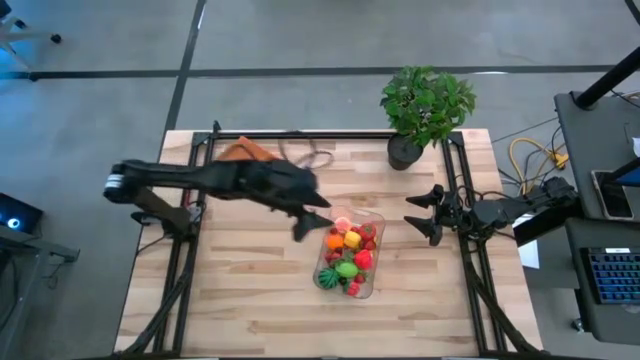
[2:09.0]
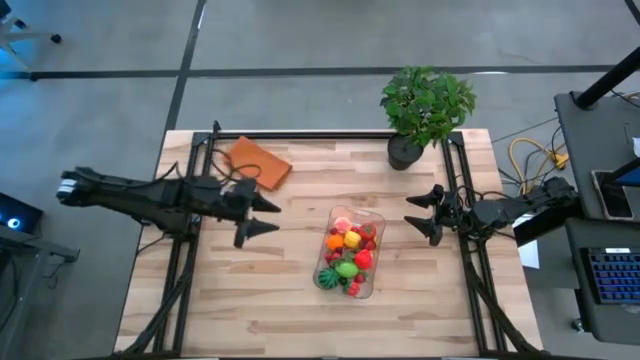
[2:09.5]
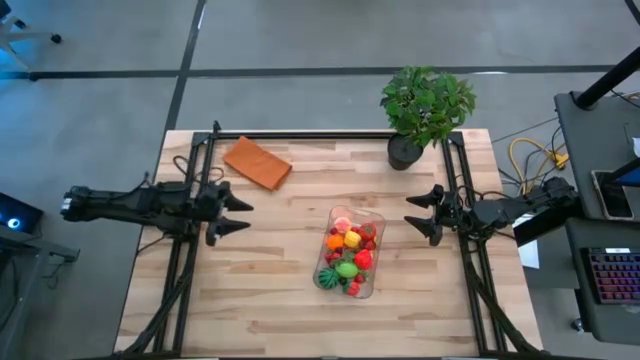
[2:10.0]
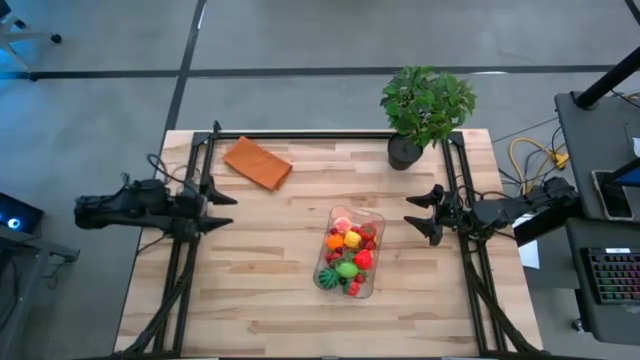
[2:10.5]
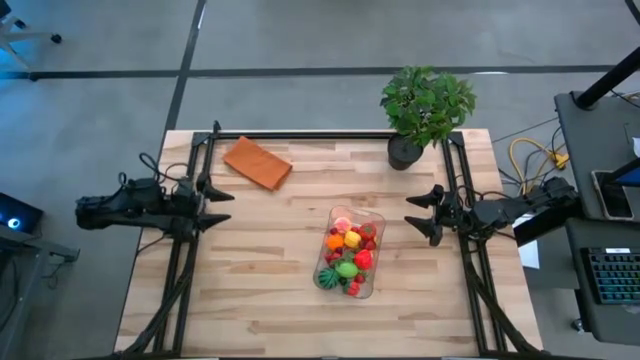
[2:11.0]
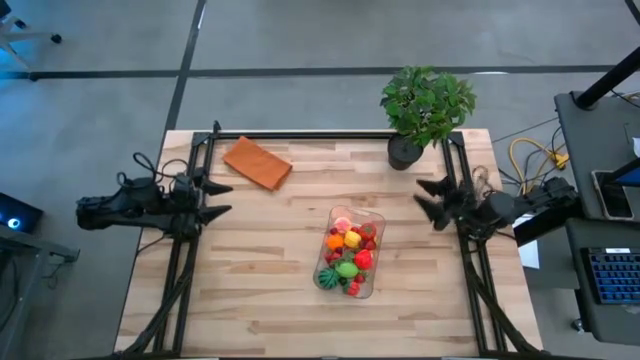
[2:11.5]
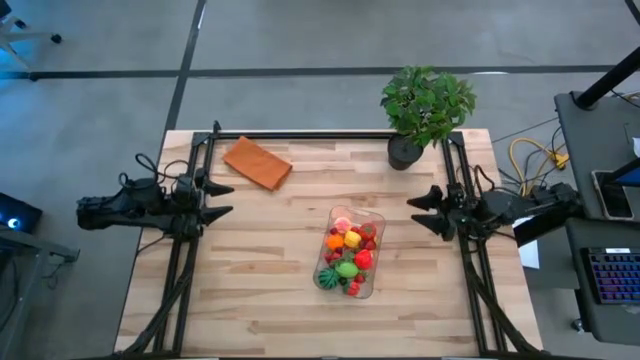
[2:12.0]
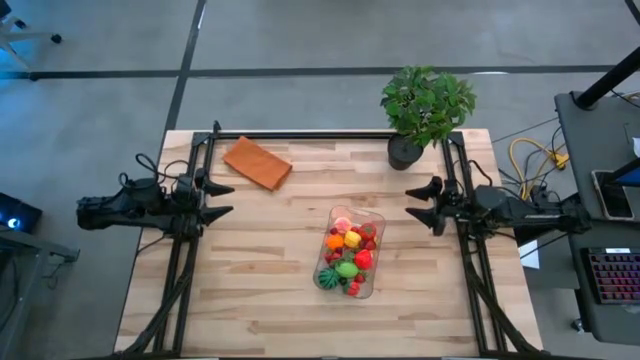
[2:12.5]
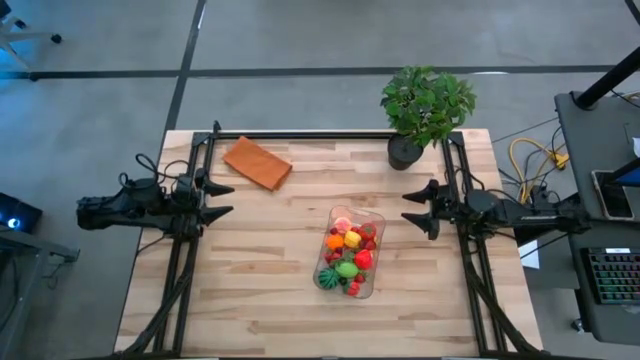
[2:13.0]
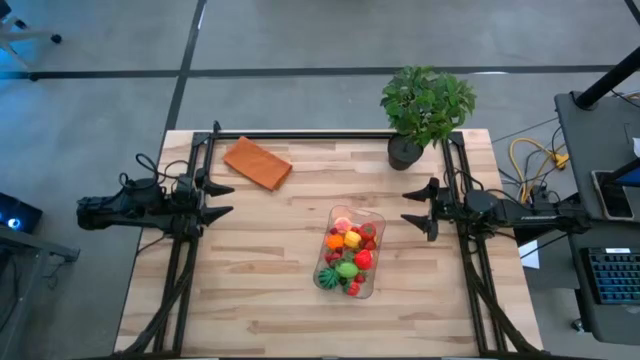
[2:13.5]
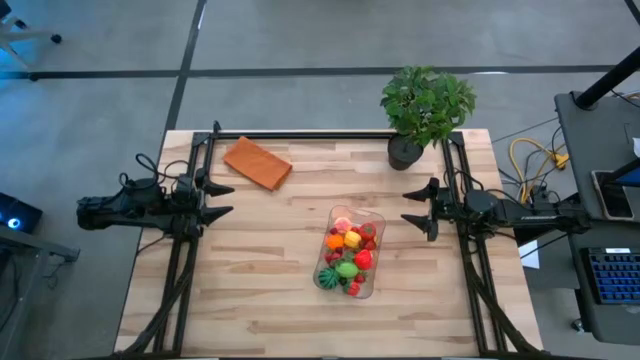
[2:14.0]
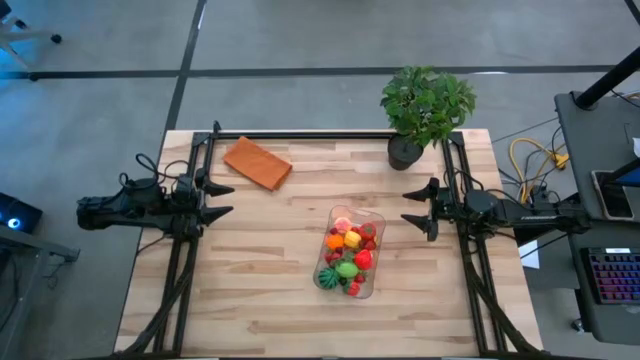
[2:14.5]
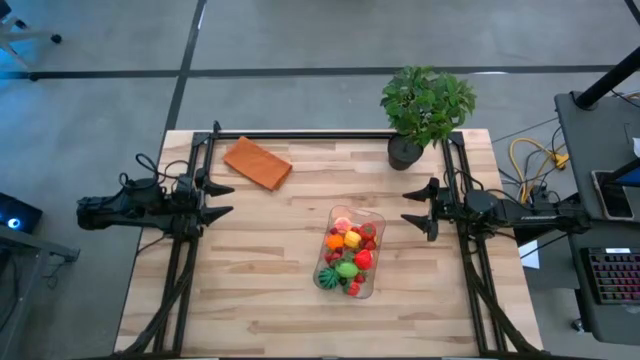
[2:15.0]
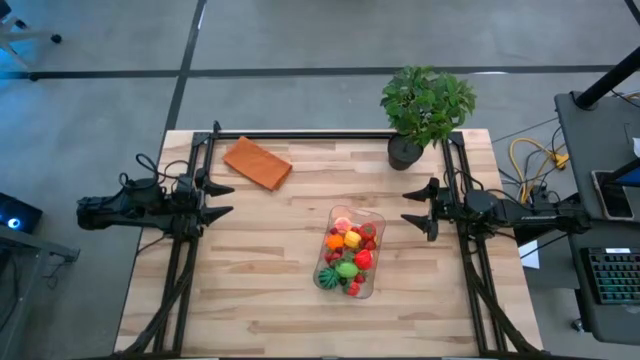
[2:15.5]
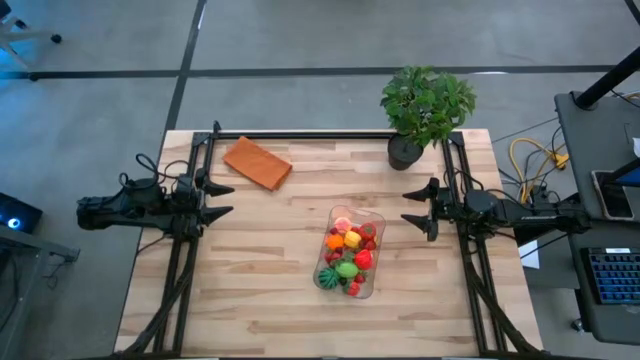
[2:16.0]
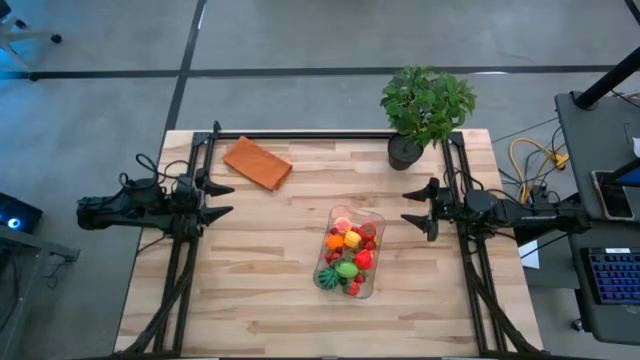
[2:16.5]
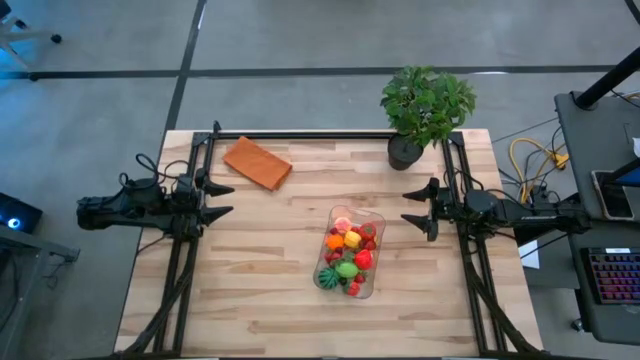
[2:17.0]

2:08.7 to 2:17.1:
Task: Pick and placing Produce into tupperware
Return to Home Position

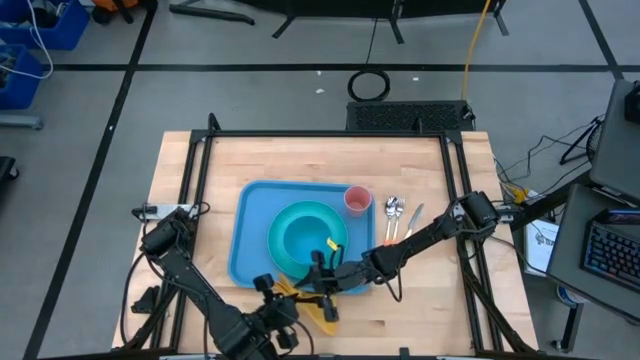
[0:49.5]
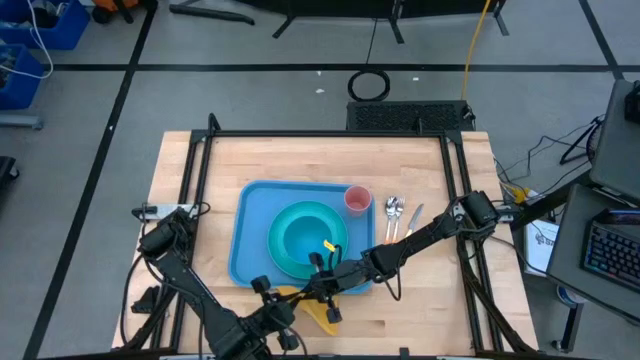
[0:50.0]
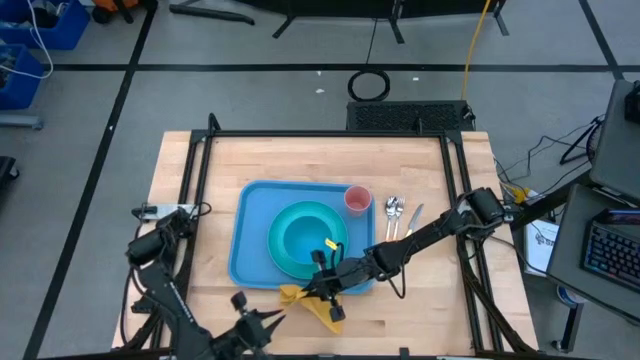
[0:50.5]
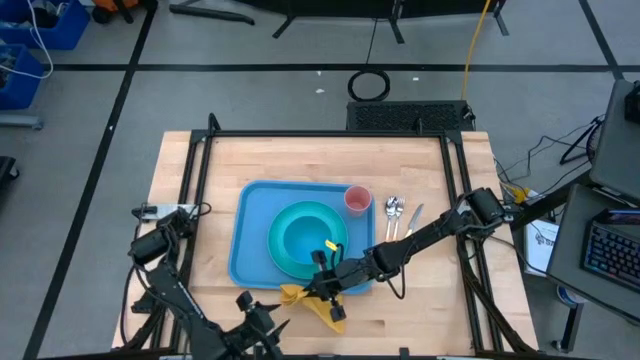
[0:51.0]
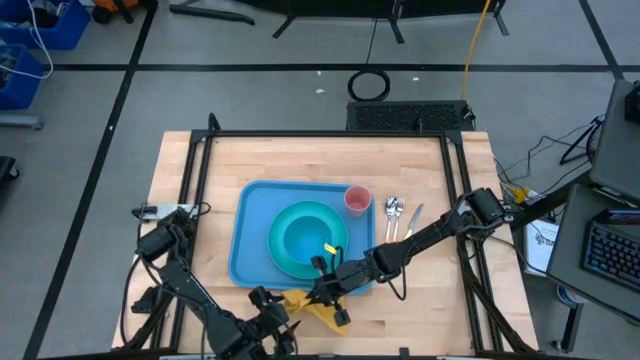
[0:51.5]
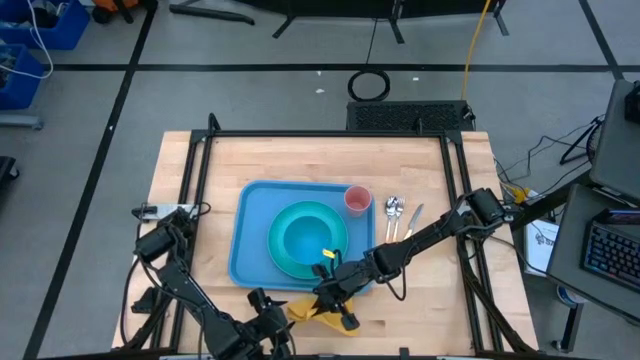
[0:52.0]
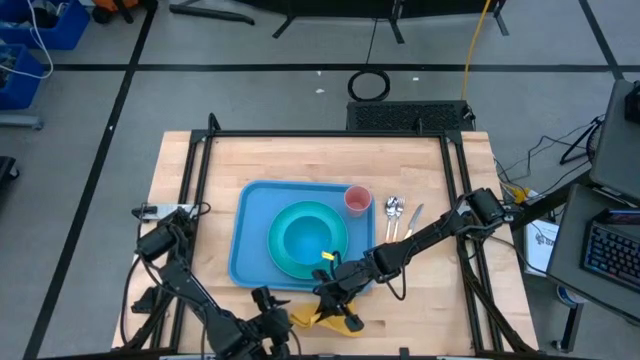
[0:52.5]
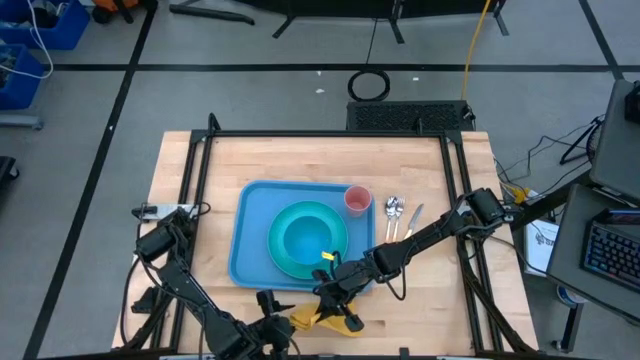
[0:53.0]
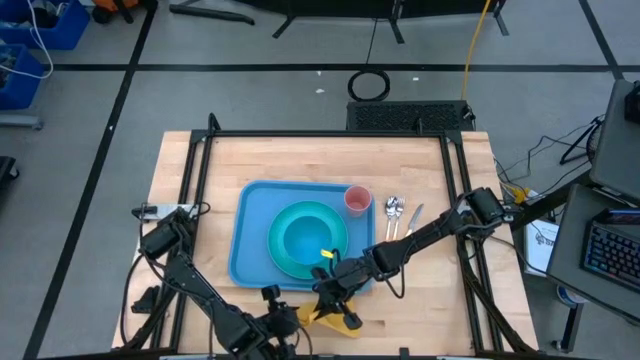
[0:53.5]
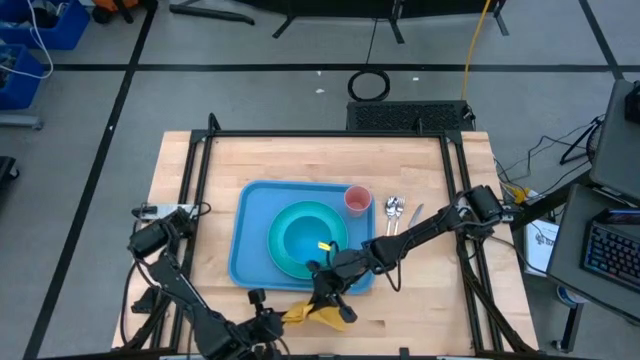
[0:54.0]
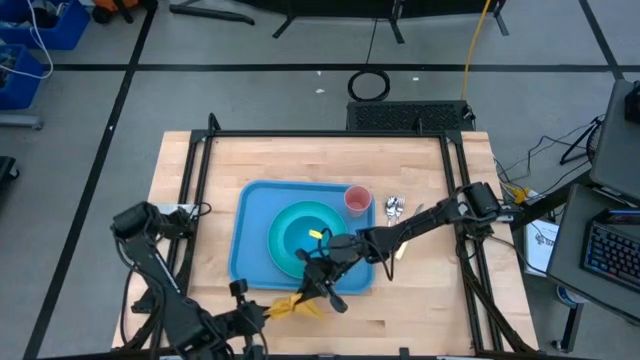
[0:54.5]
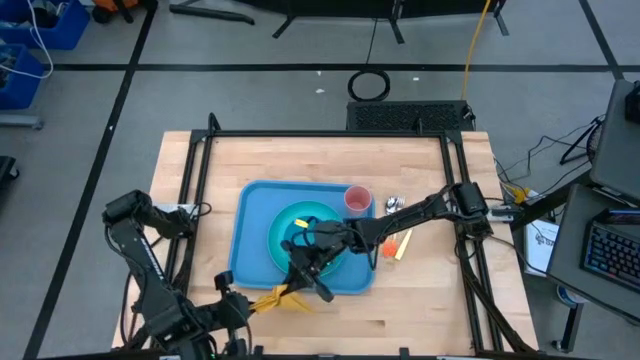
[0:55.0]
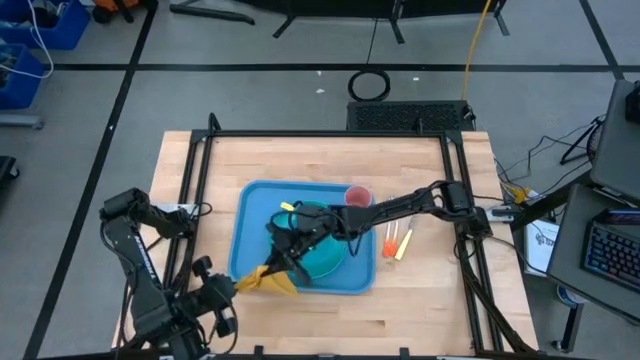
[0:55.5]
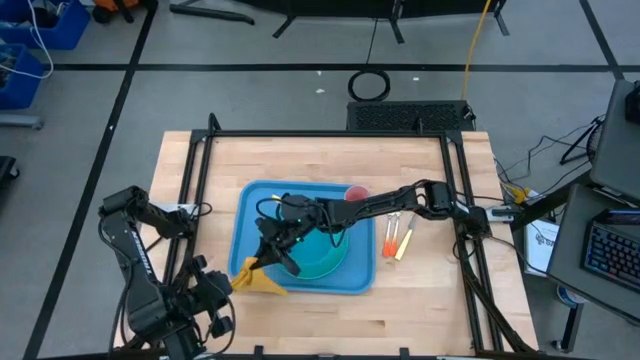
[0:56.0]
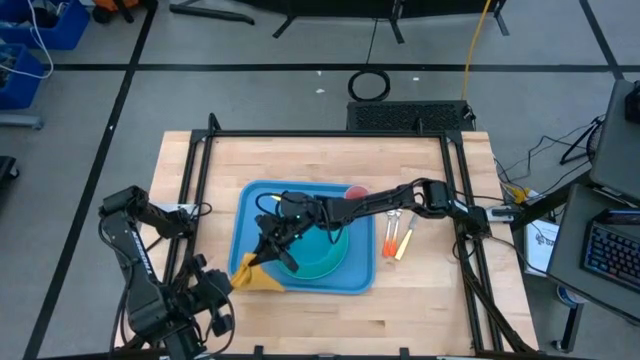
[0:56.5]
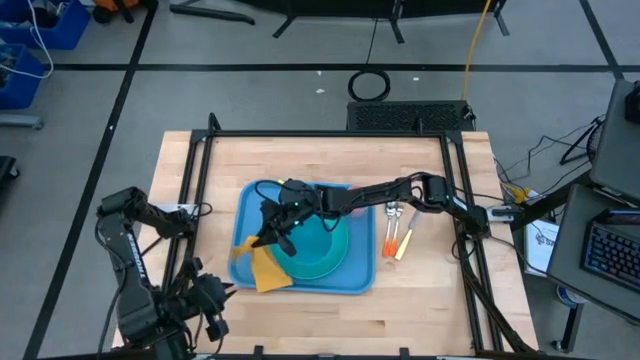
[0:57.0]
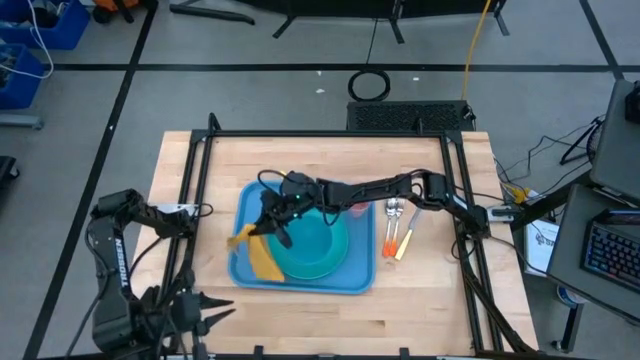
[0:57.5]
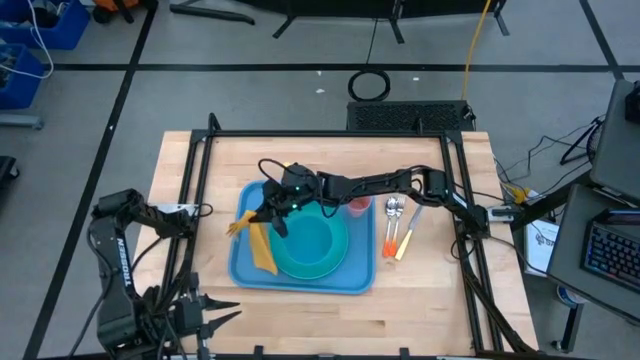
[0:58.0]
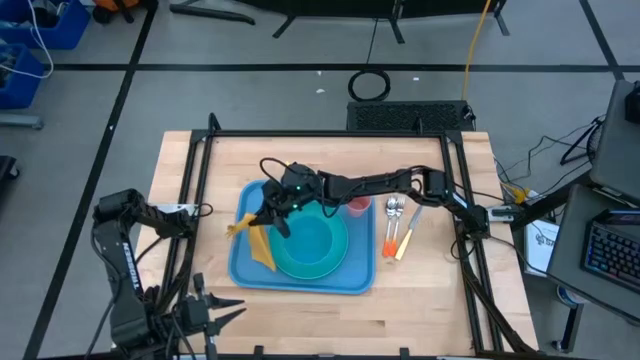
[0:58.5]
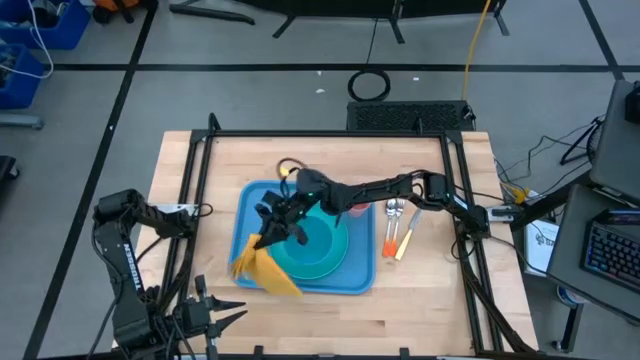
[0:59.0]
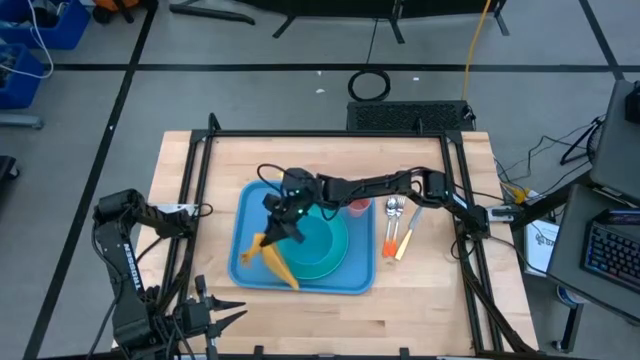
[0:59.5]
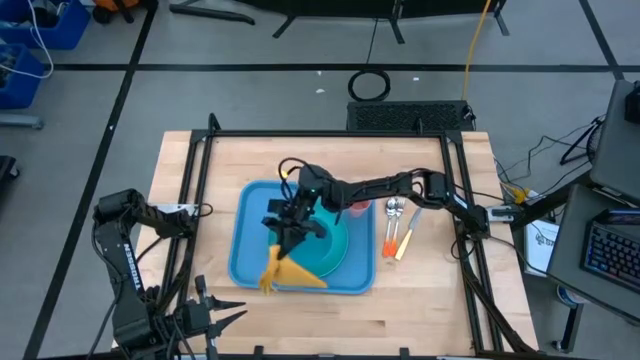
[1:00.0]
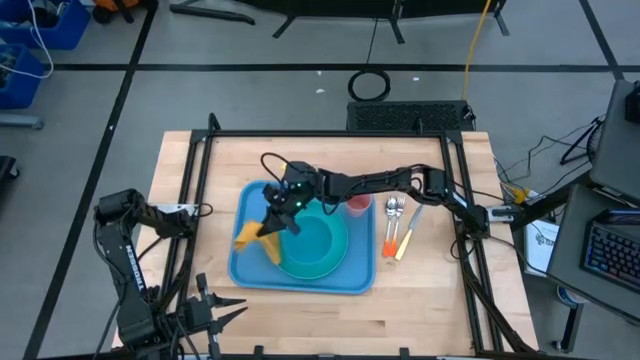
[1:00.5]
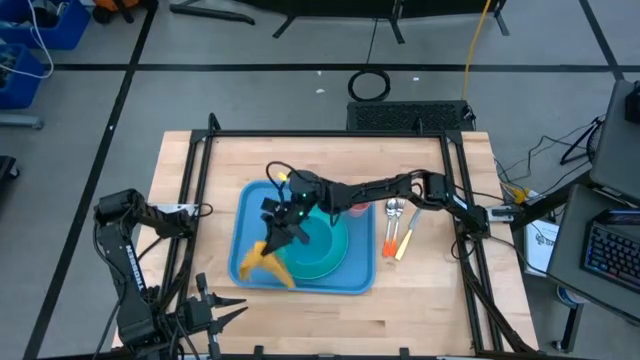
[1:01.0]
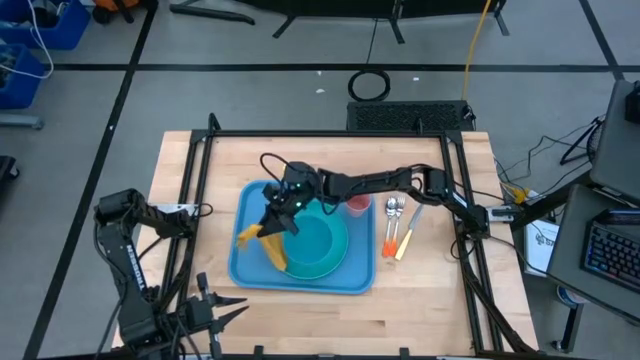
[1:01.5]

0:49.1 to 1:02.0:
Task: Set up tray
Put the yellow napkin on the blue serving tray to the left of the green plate
